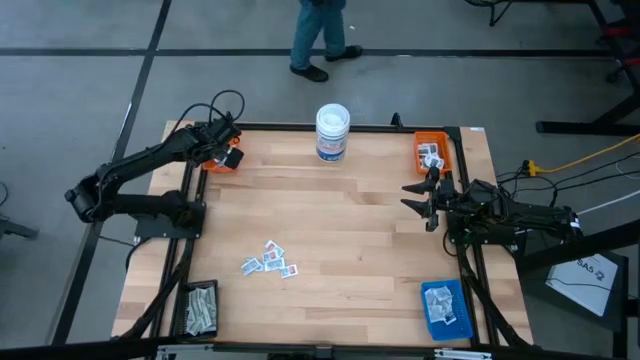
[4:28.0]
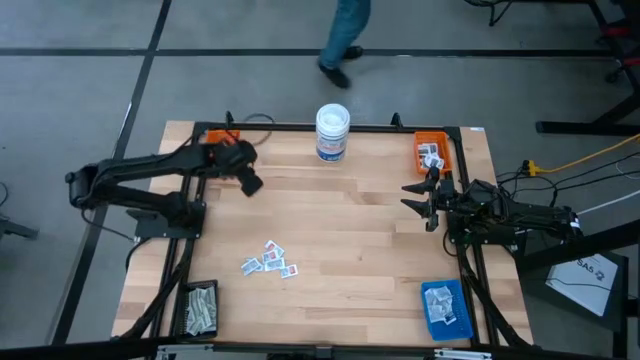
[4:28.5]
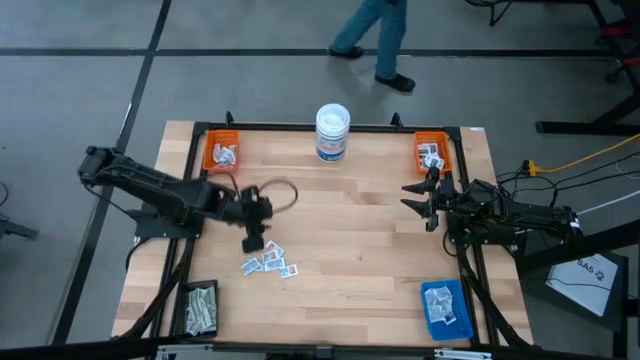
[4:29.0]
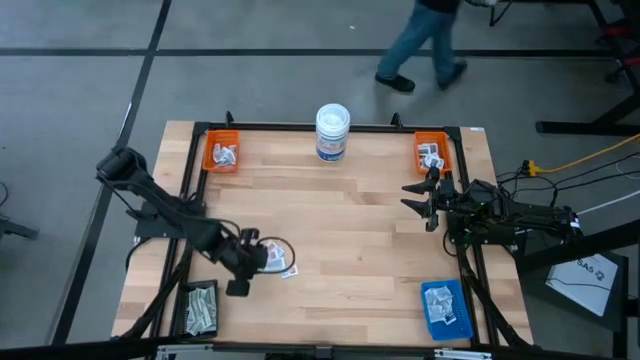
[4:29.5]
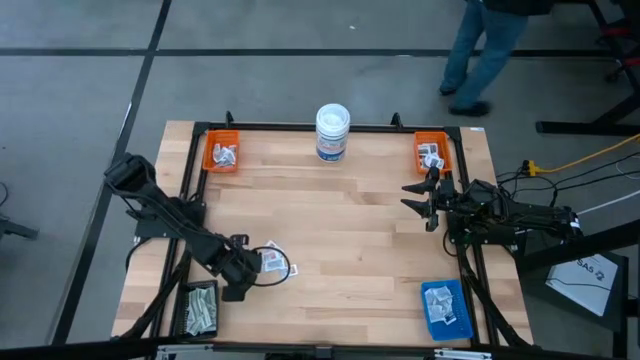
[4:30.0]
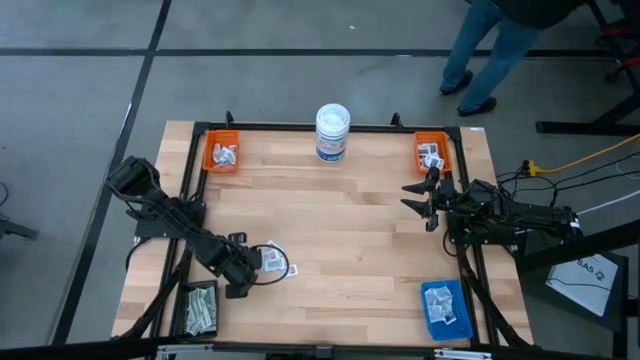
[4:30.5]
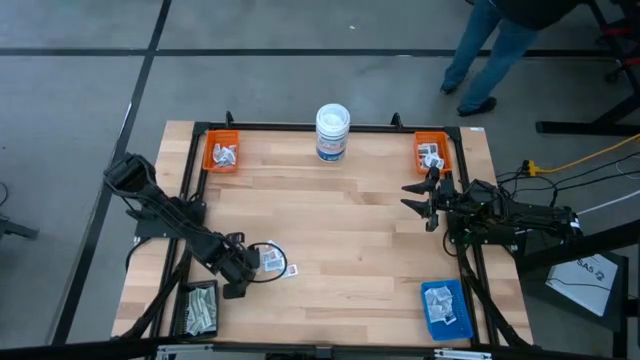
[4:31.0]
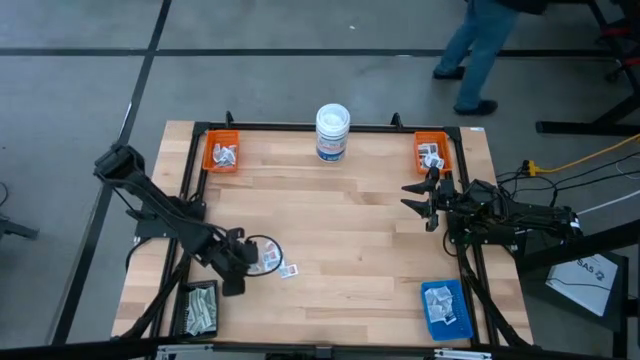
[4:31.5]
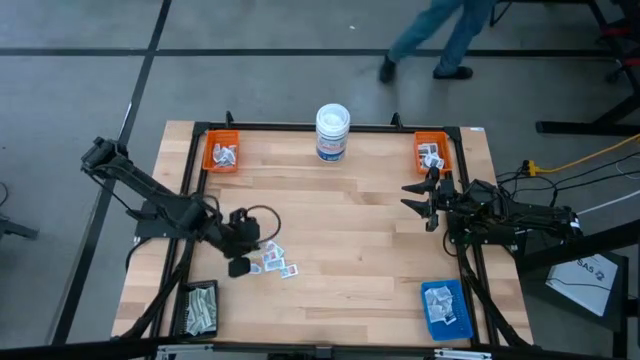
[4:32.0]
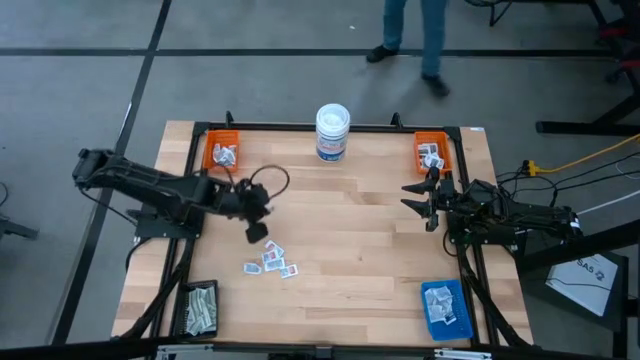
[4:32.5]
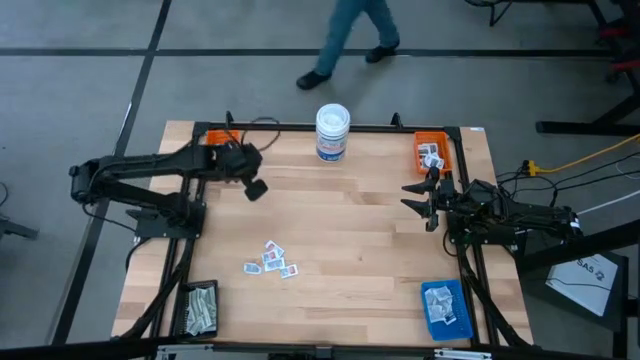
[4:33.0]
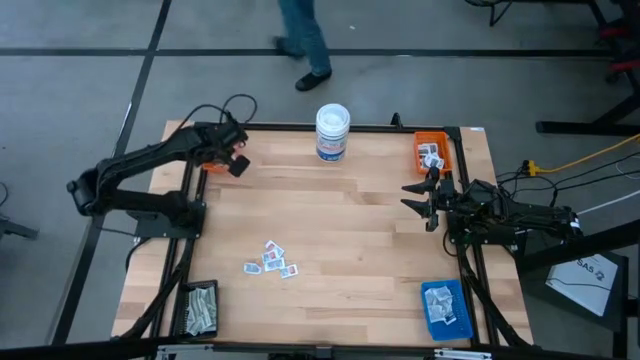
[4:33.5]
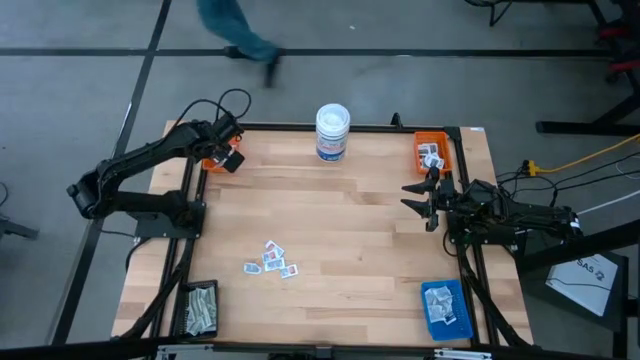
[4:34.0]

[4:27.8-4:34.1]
Task: Pick & Place First Aid Supplies
Put the orange ointment pack into the left orange bin

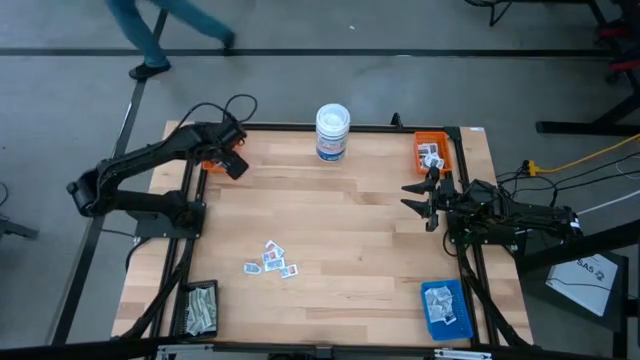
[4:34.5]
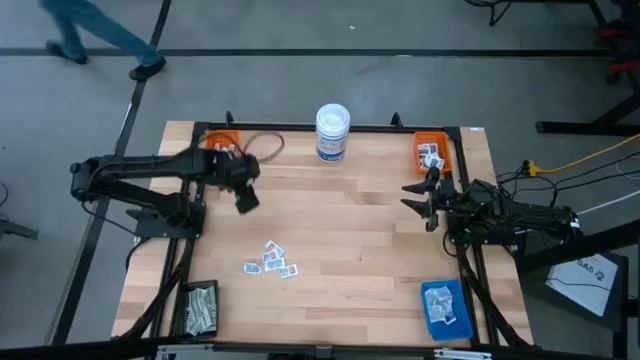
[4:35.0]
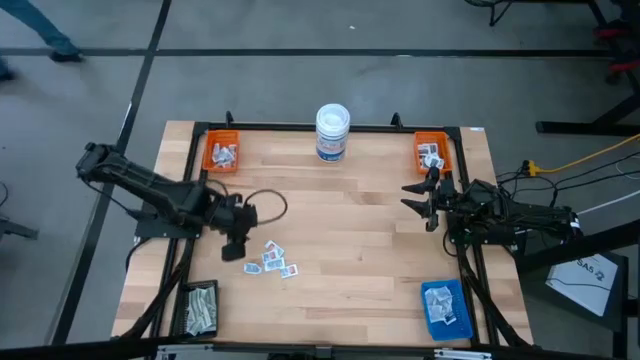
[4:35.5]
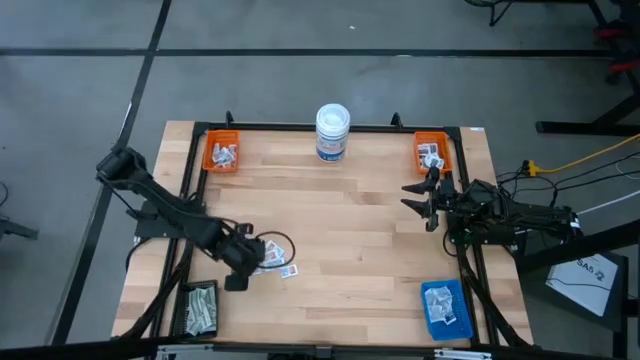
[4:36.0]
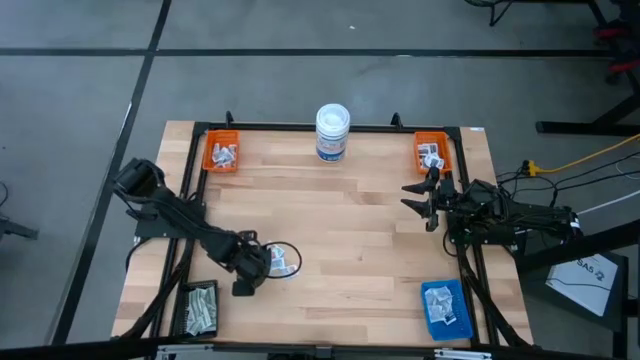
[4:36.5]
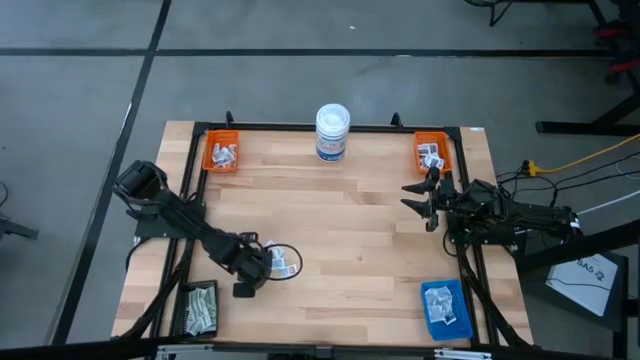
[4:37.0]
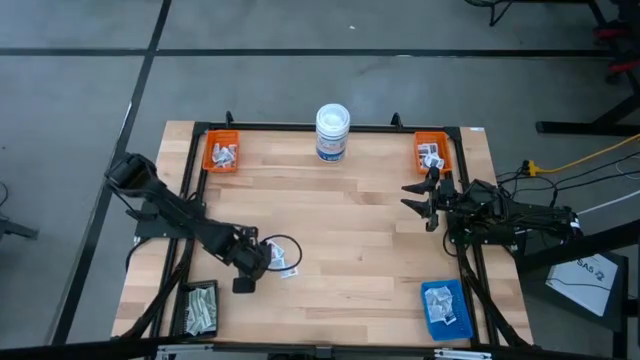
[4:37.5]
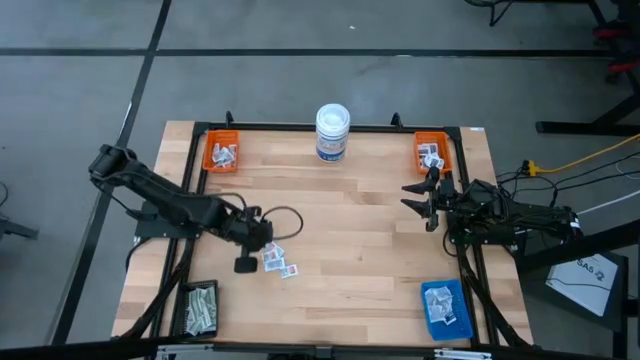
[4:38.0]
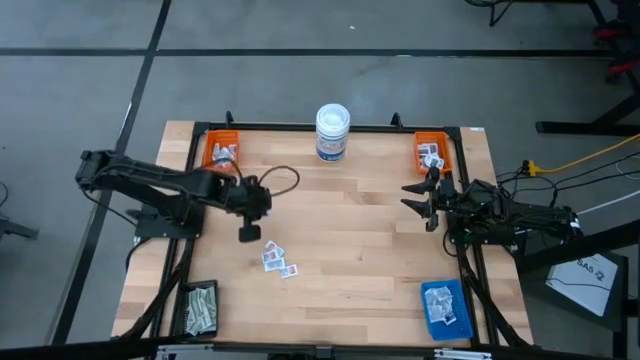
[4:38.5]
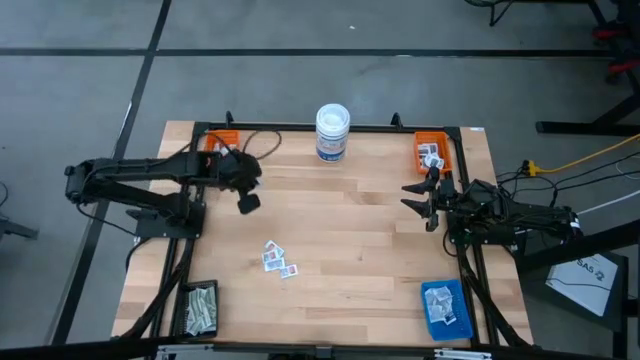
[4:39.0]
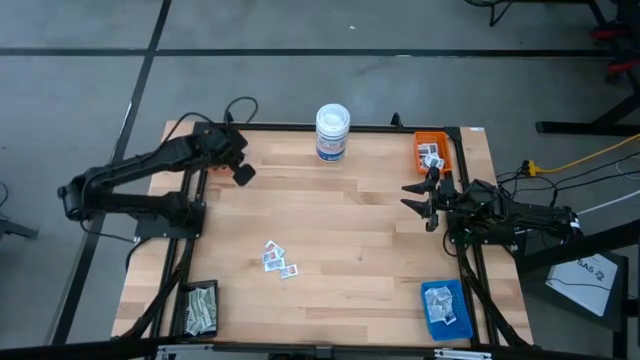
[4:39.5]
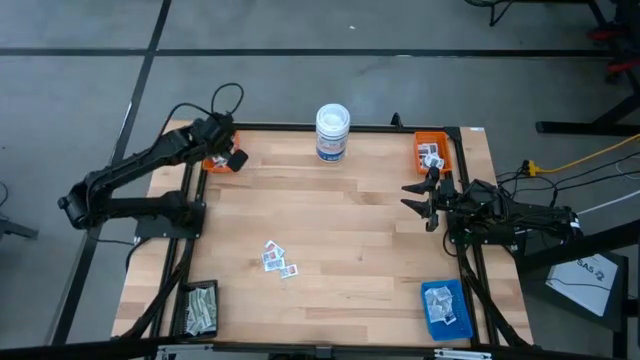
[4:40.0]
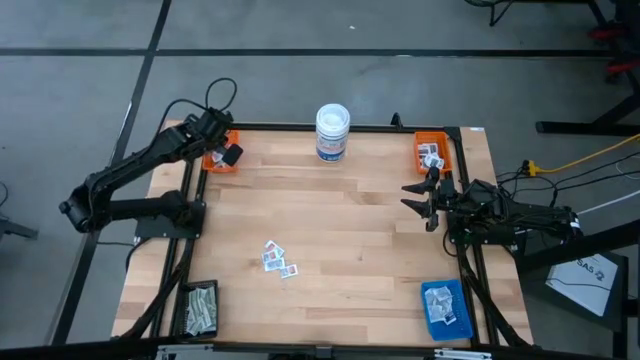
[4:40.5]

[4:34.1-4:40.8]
Put the orange ointment pack into the left orange bin

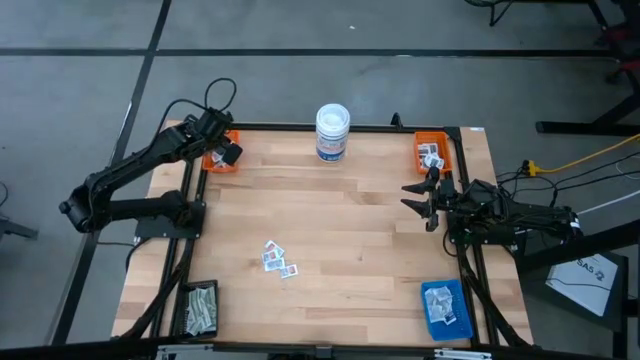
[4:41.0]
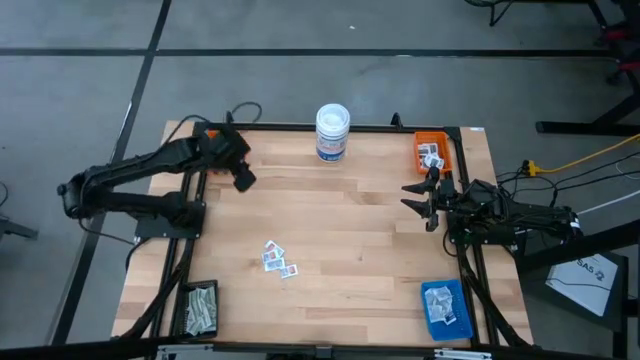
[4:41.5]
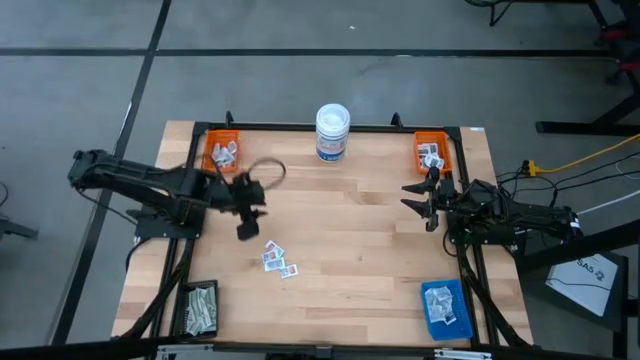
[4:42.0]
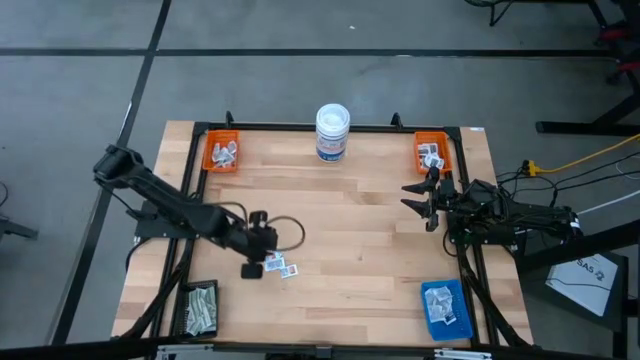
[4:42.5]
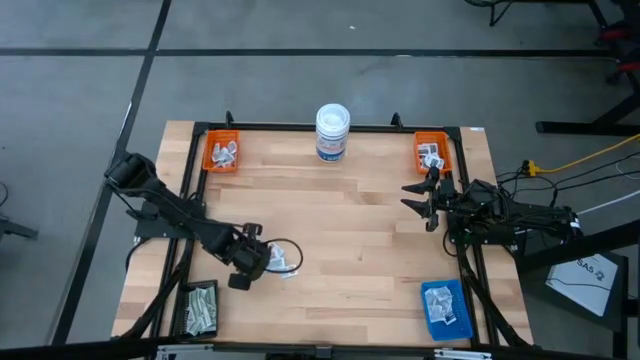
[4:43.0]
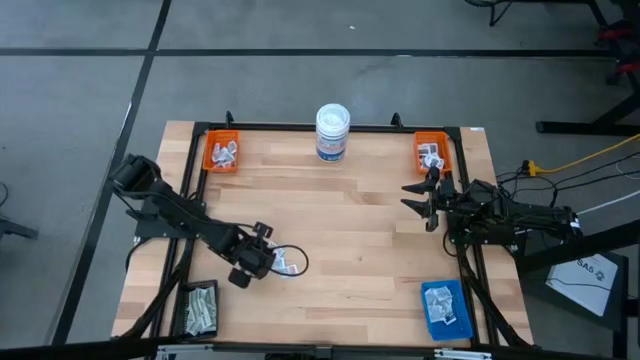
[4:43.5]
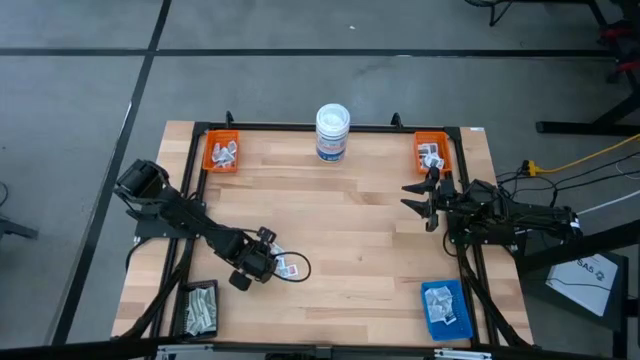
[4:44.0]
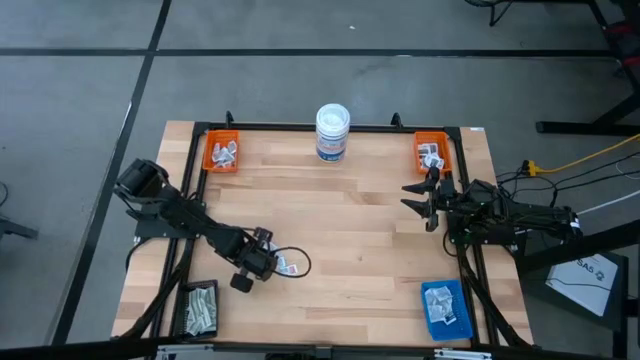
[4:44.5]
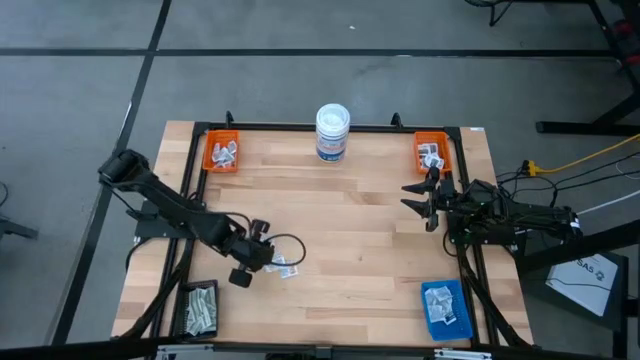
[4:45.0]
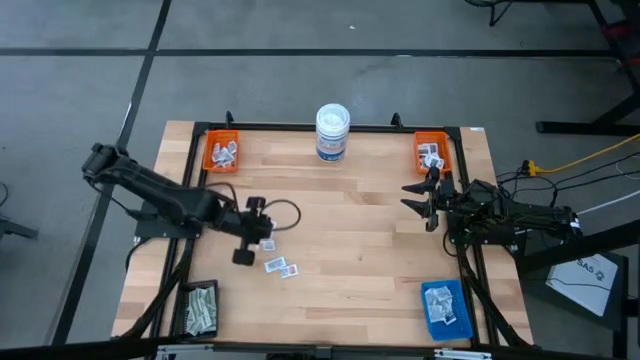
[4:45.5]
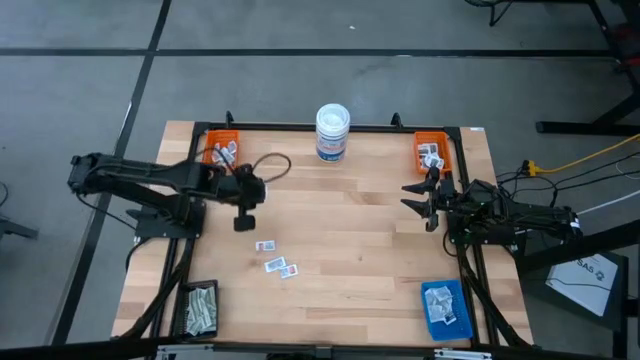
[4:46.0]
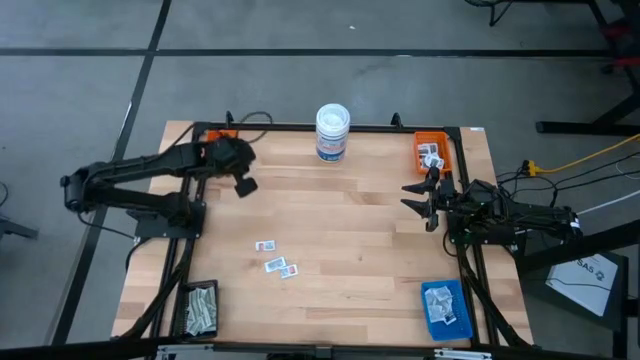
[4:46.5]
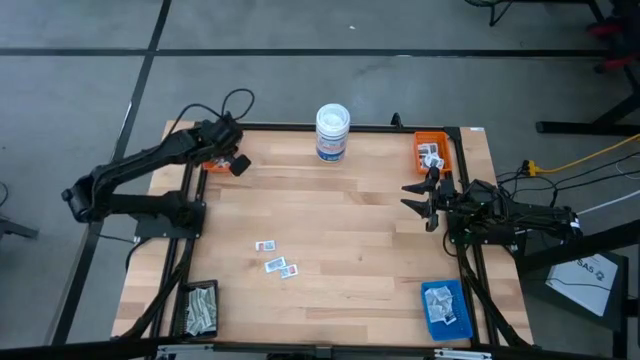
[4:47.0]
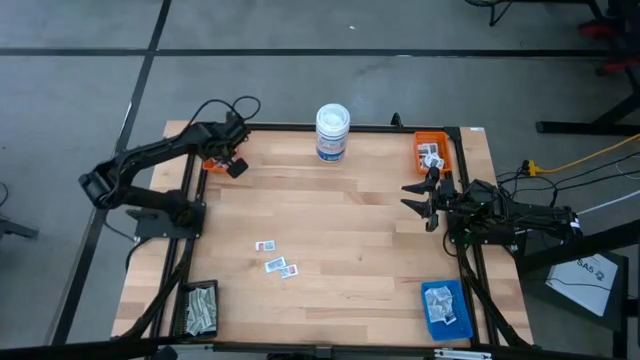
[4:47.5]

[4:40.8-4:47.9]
Put the orange ointment pack into the left orange bin

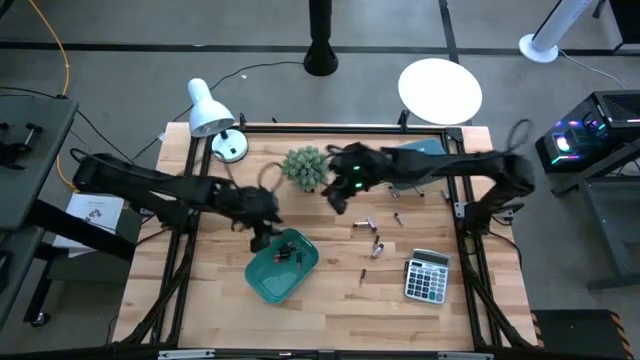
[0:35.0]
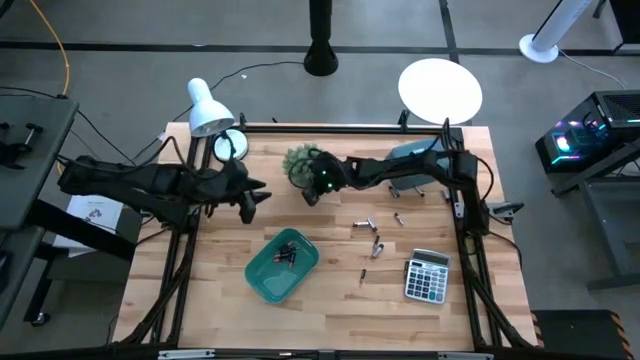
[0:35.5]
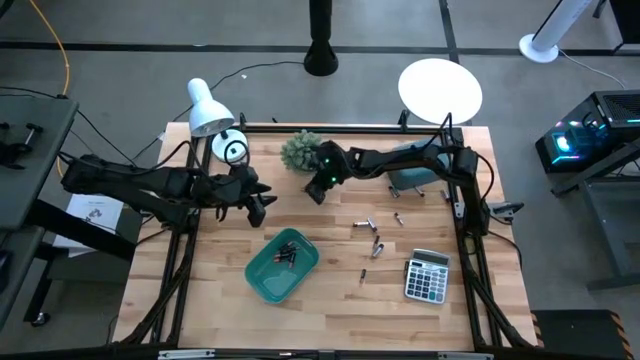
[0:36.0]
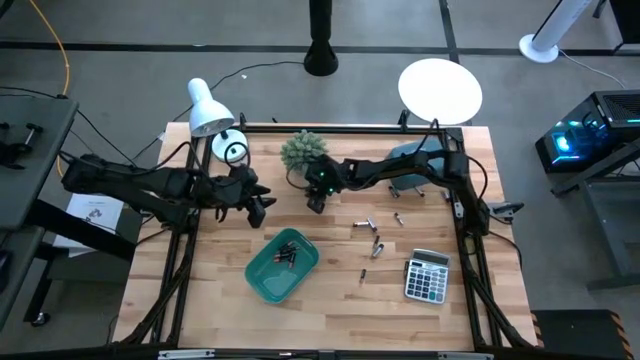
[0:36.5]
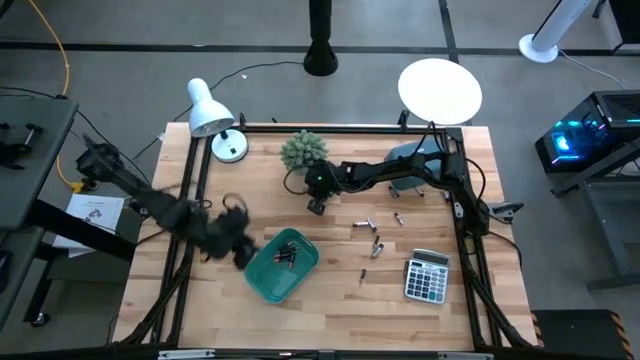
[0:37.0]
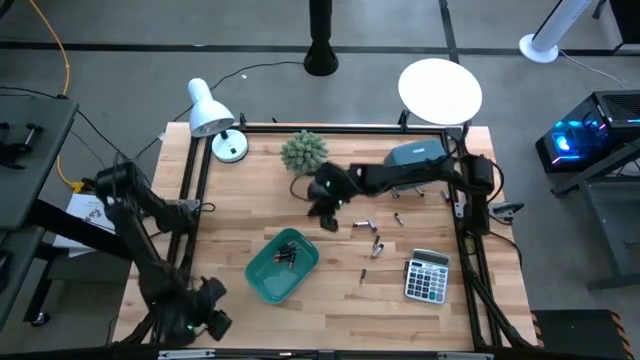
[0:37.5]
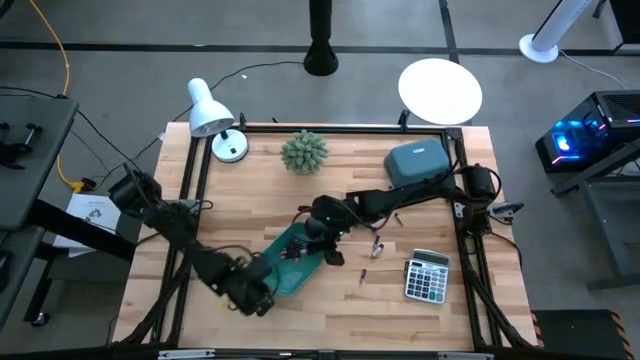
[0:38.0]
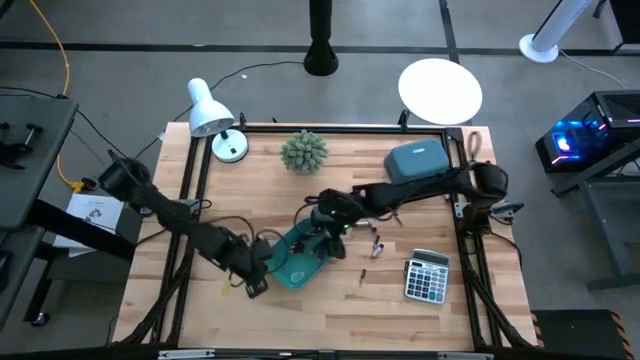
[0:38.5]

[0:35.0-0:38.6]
Task: Sort batteries
Put the black battery into the green bin
